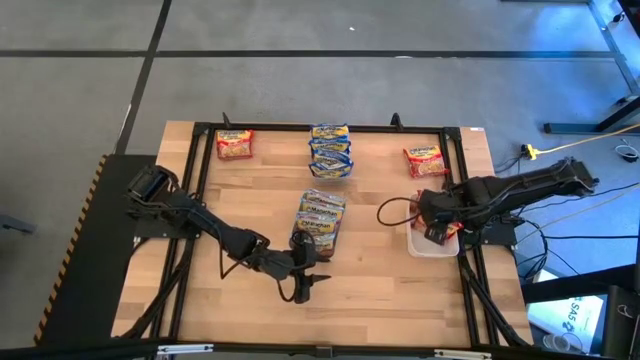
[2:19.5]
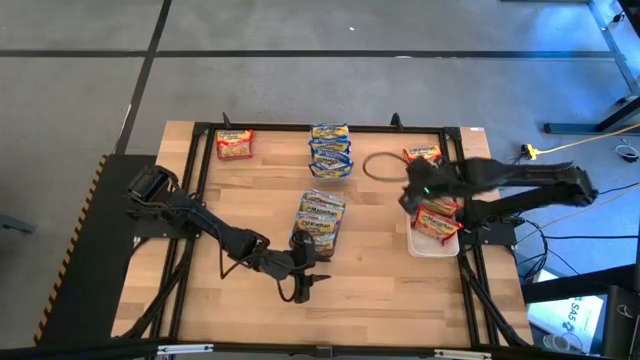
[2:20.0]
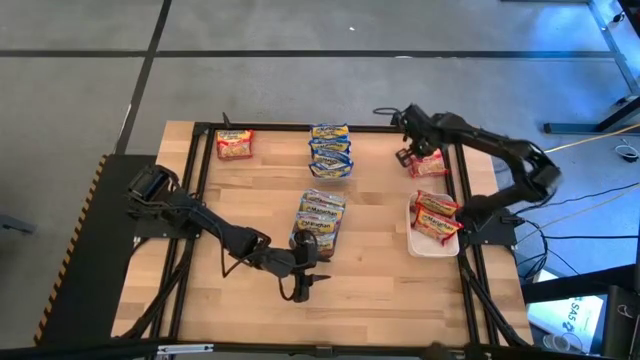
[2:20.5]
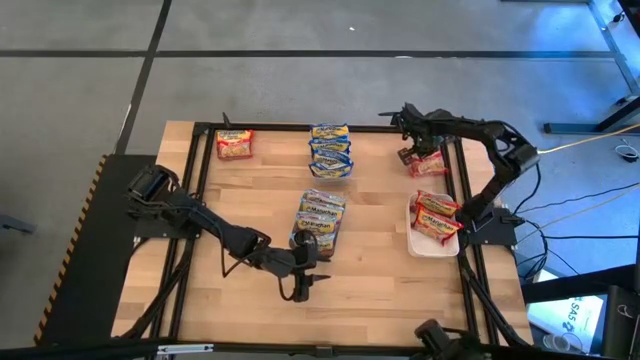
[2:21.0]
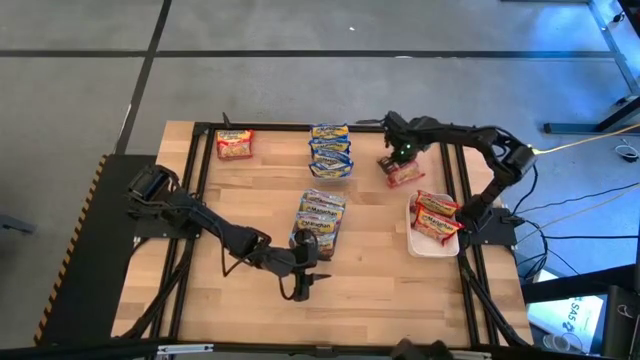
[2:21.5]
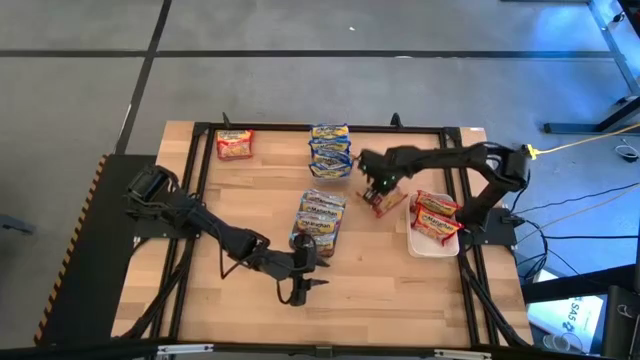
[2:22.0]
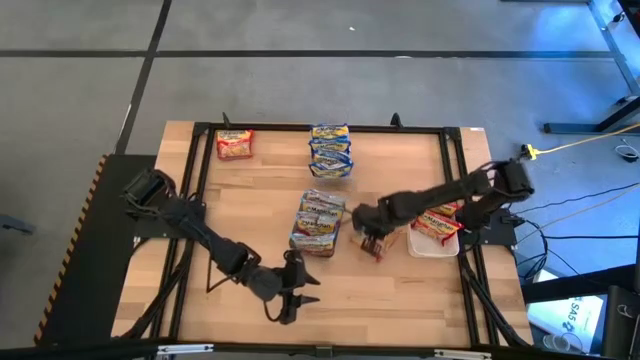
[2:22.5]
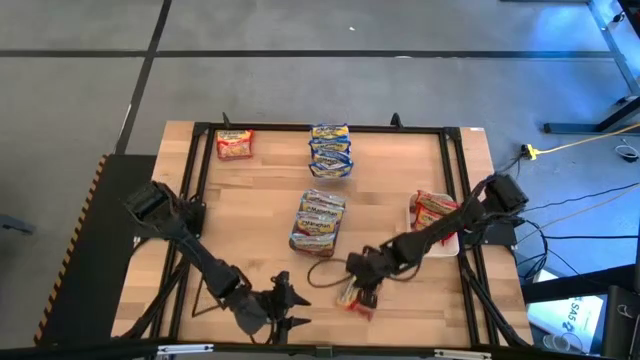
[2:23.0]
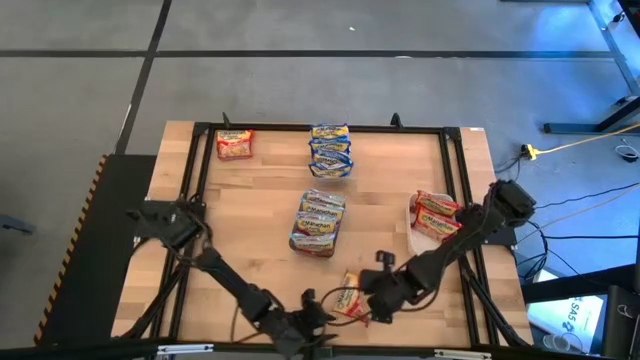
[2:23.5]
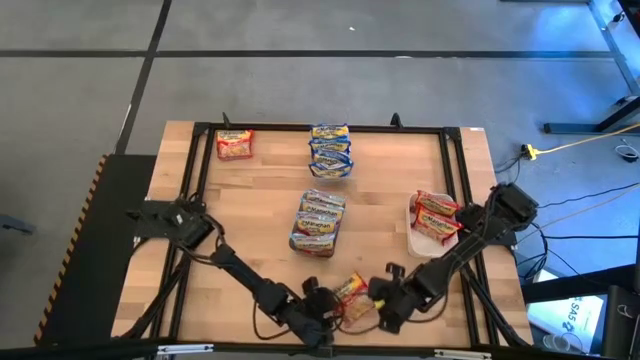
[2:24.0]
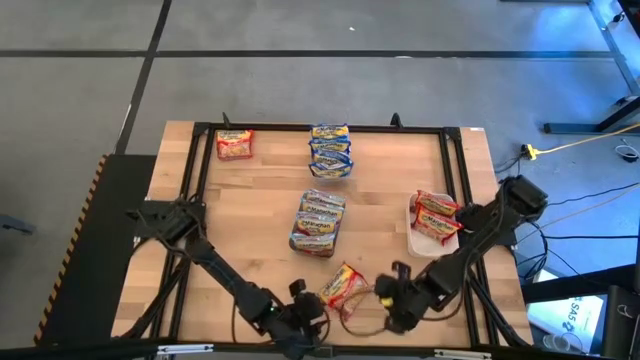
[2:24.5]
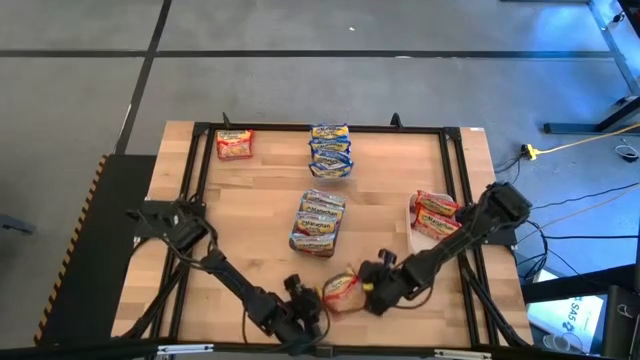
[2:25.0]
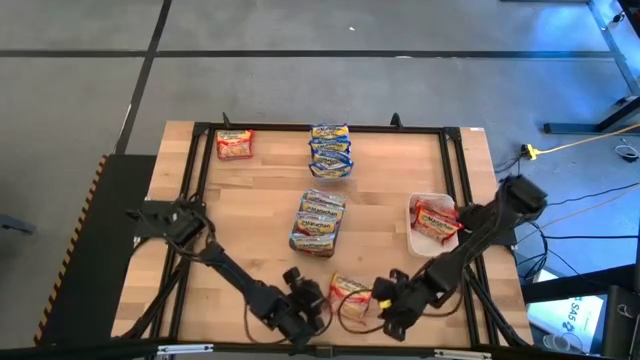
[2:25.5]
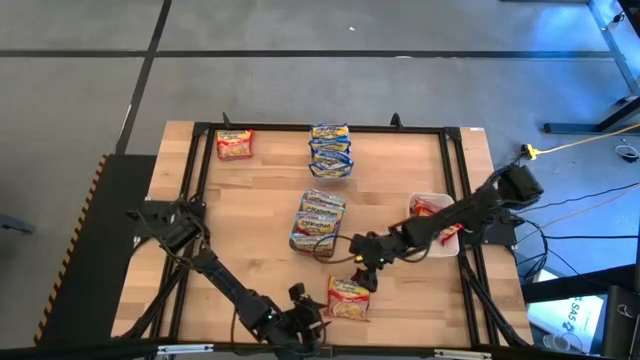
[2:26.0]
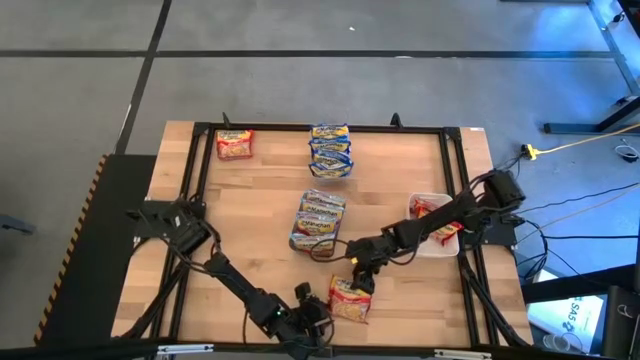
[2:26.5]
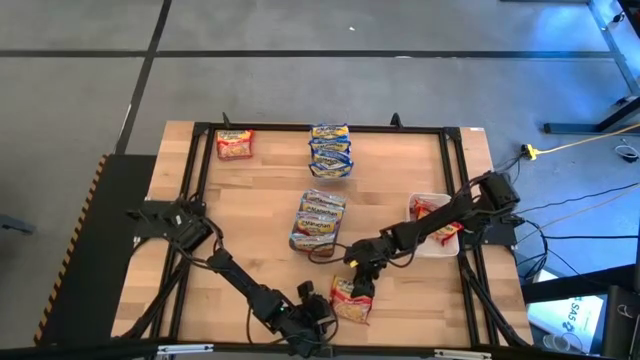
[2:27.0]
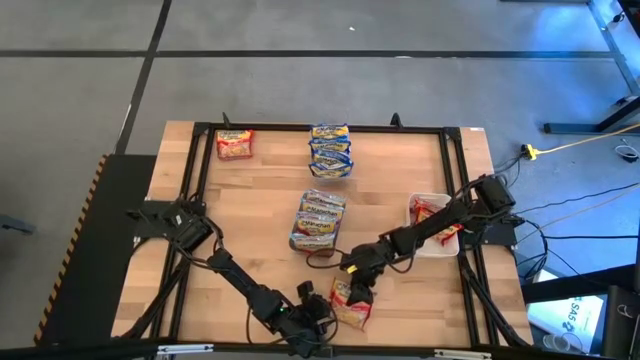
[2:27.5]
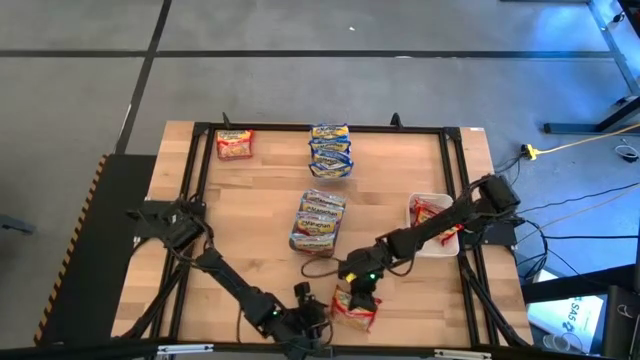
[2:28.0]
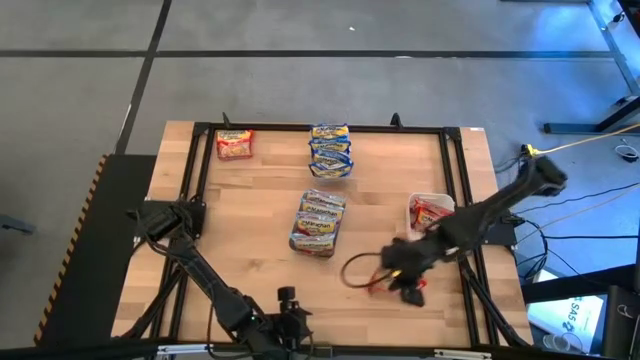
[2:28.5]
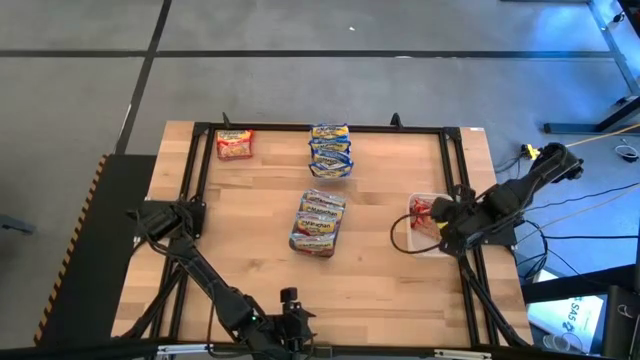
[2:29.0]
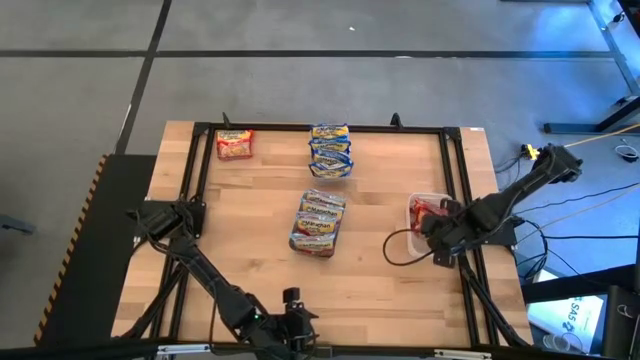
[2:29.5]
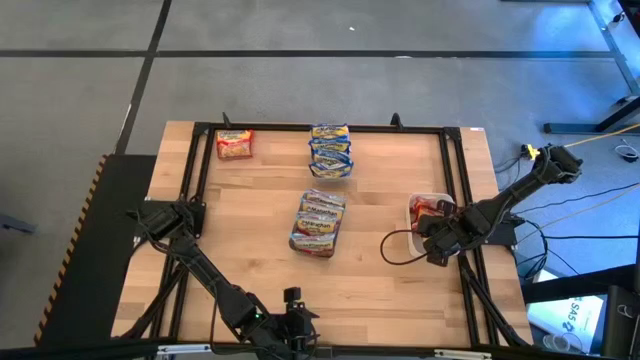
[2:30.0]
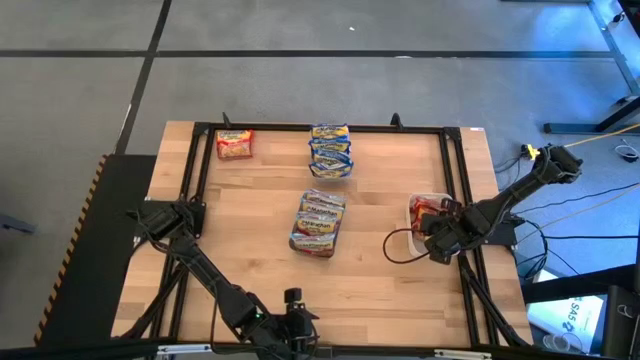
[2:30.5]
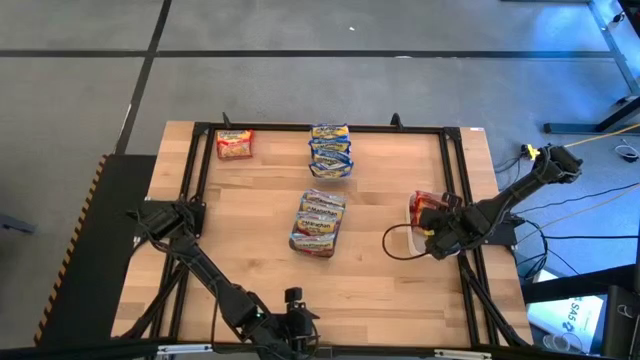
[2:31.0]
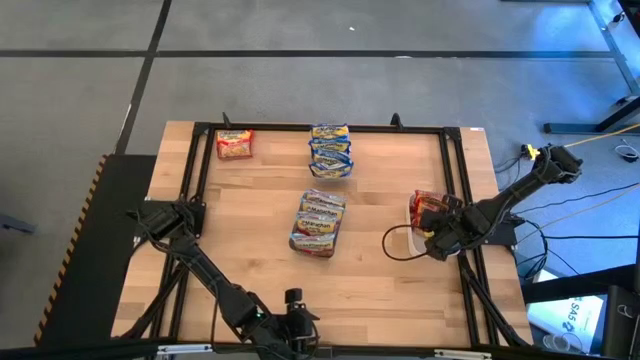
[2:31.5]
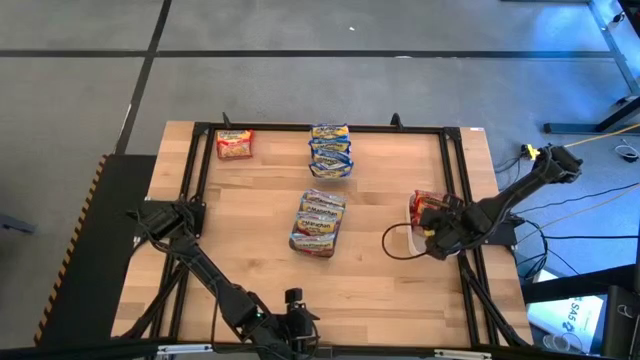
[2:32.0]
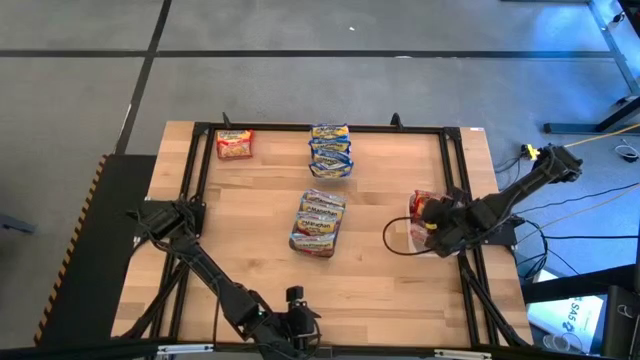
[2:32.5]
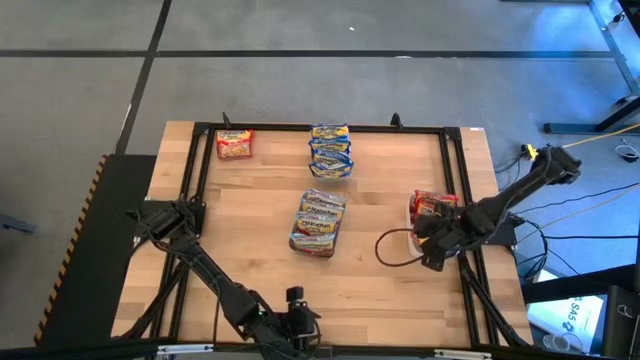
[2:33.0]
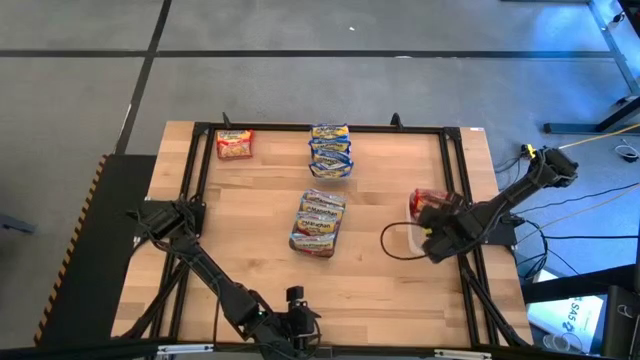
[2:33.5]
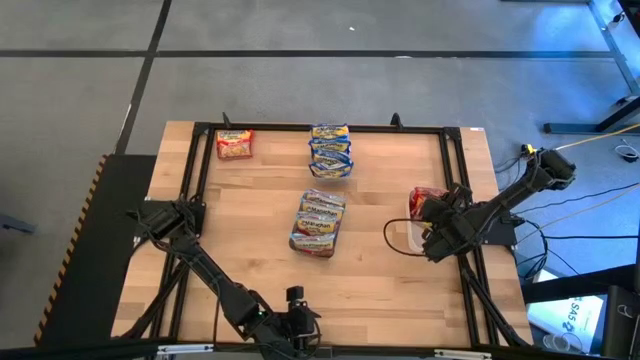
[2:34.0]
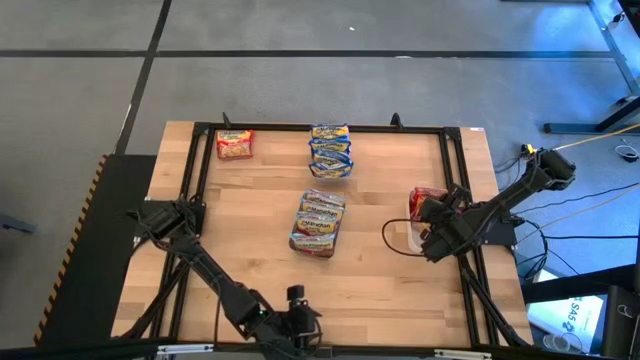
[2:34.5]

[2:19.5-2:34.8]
Task: Sort Maruchan noodles
Put the red noodle pack into the white bin

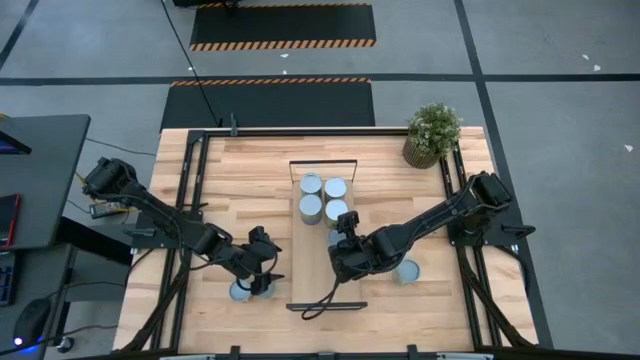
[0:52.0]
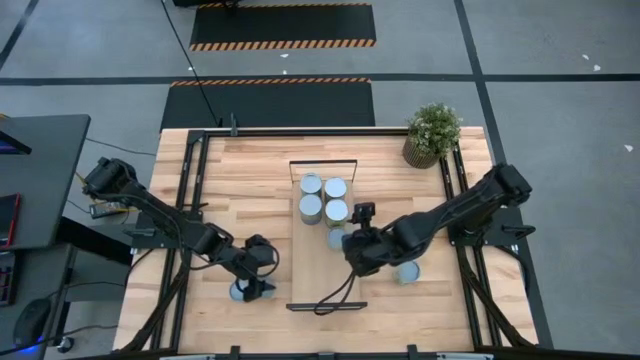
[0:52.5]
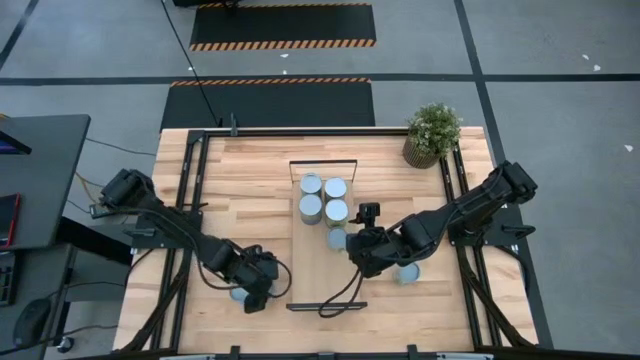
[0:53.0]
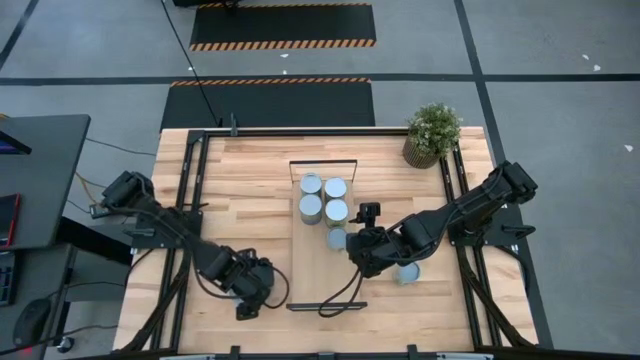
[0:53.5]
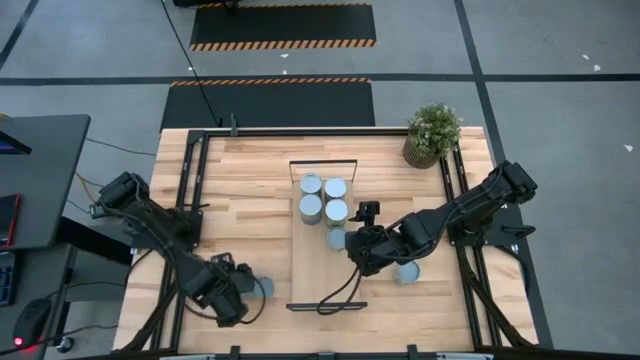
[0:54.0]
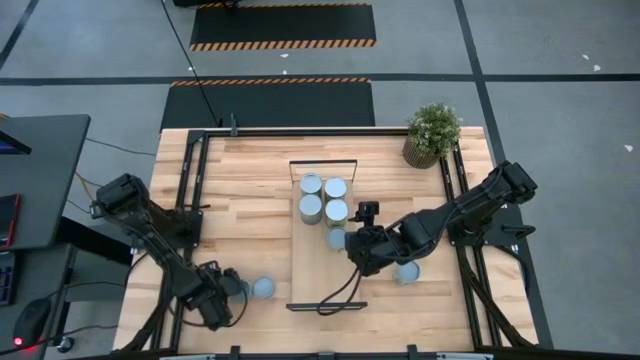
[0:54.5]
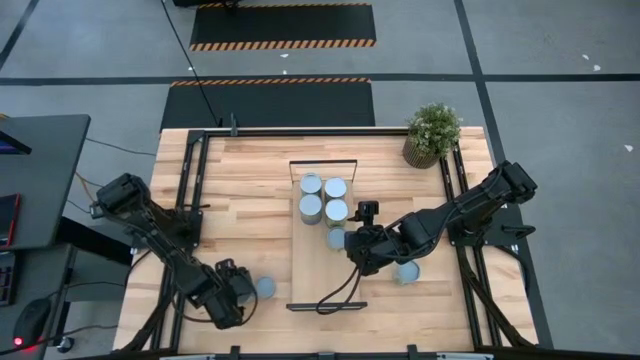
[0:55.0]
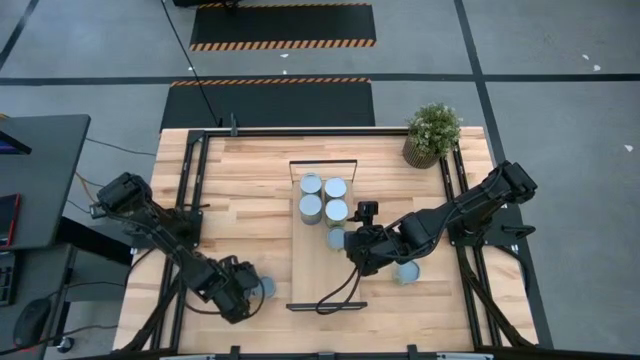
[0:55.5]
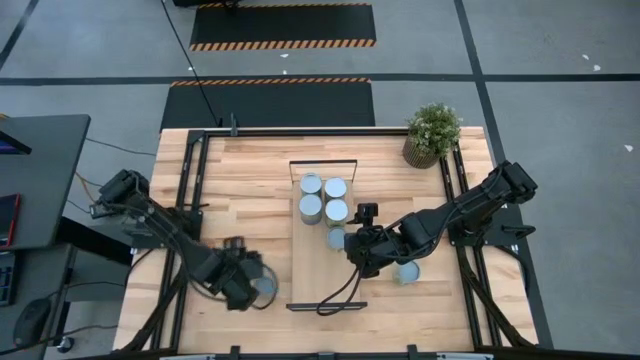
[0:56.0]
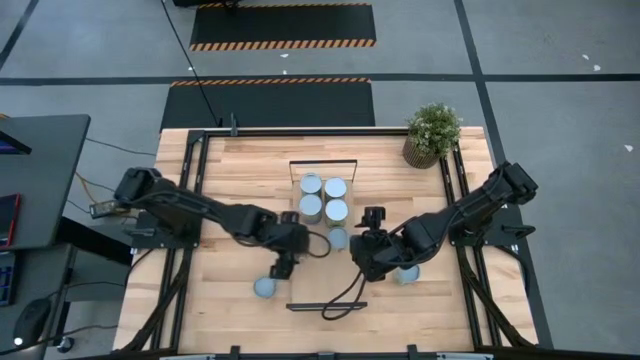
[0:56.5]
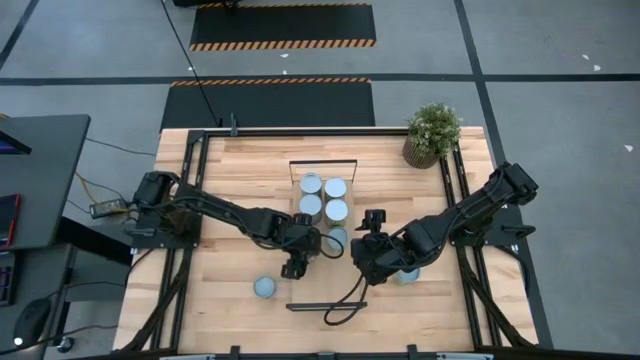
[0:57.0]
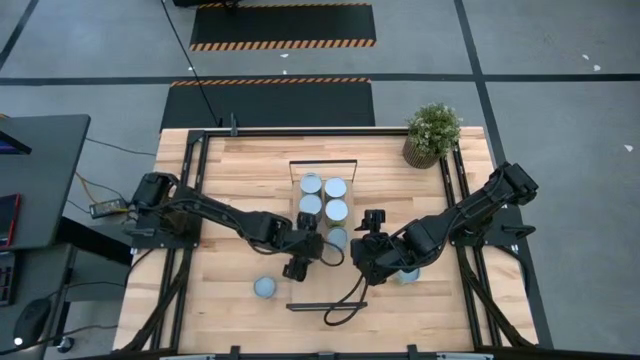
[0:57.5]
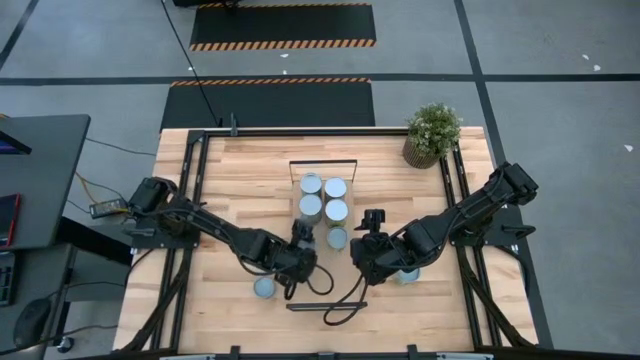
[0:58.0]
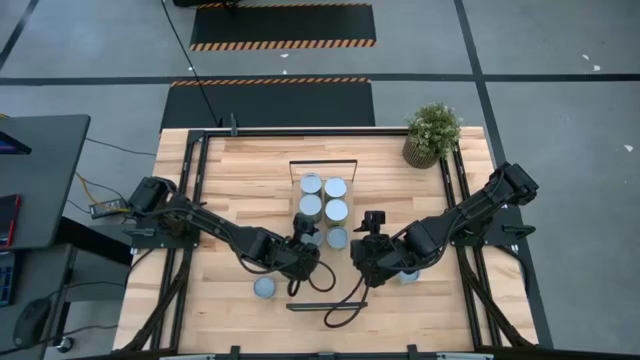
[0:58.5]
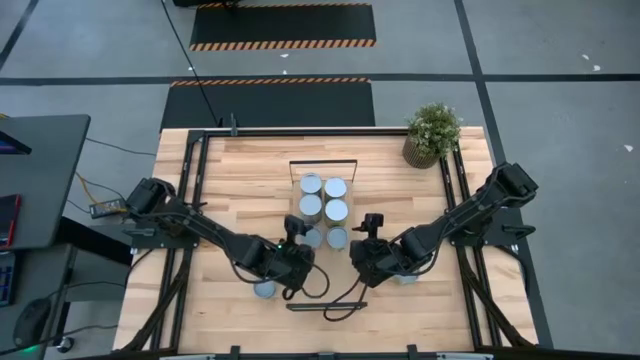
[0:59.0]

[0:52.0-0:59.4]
Task: Pick and place cans onto a shelf
Put the canned tomato on the shelf
